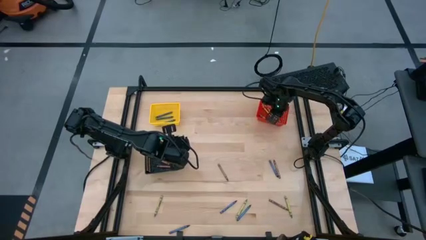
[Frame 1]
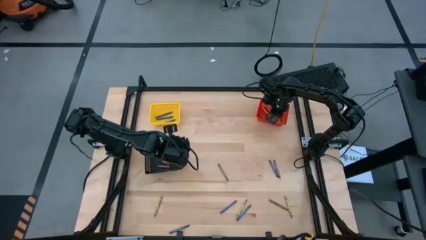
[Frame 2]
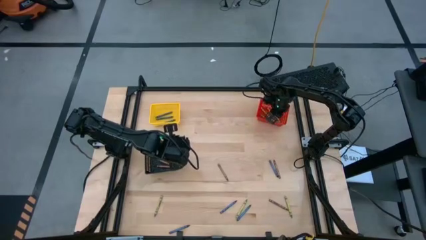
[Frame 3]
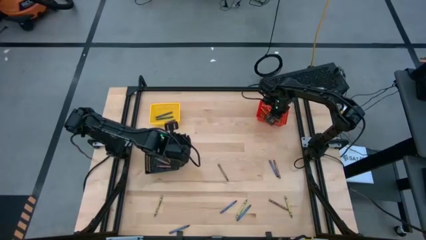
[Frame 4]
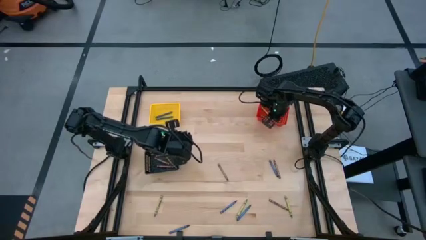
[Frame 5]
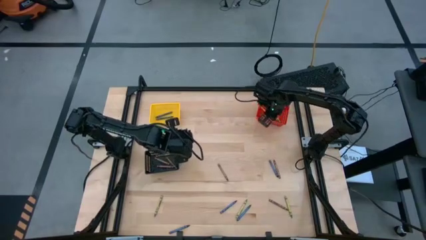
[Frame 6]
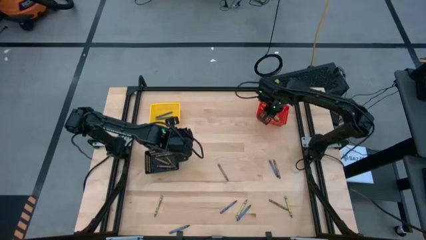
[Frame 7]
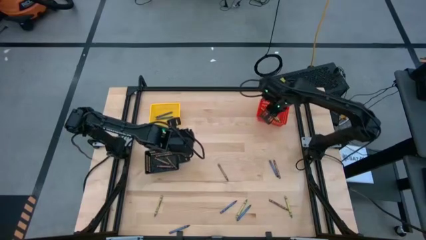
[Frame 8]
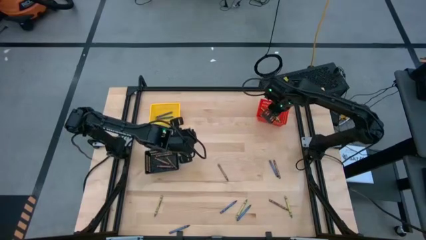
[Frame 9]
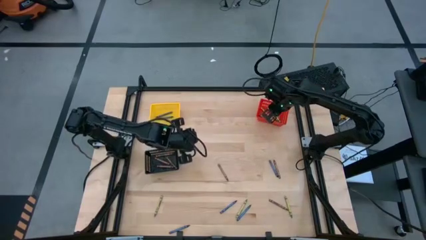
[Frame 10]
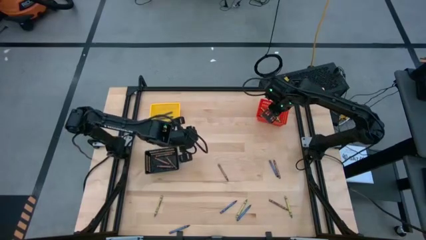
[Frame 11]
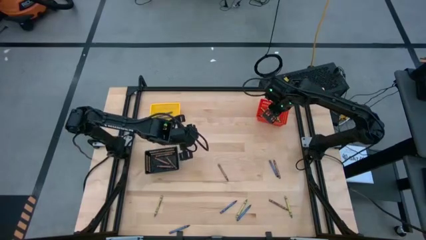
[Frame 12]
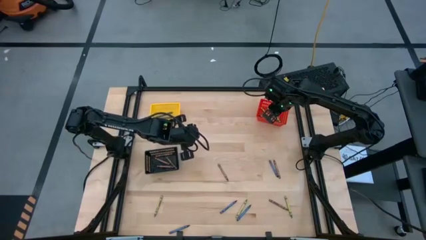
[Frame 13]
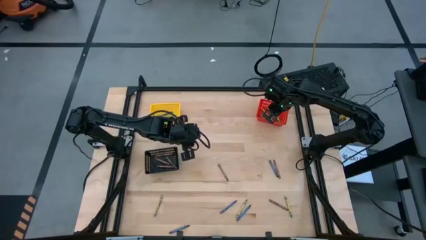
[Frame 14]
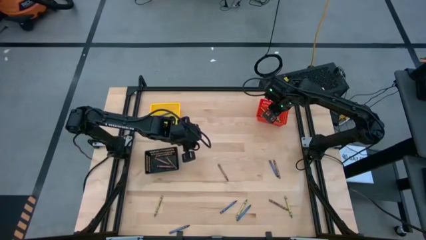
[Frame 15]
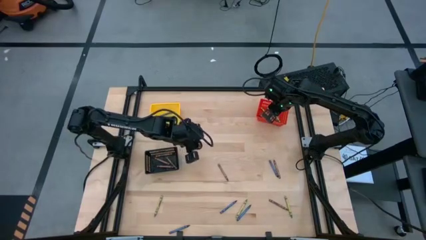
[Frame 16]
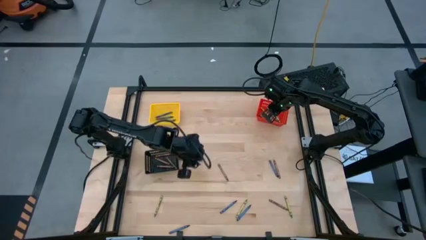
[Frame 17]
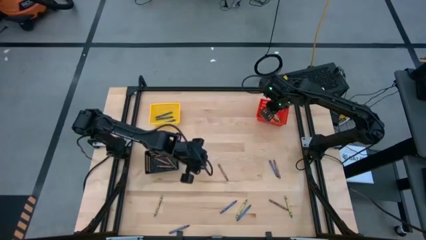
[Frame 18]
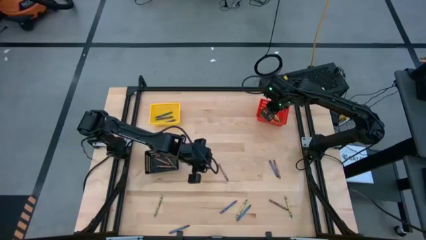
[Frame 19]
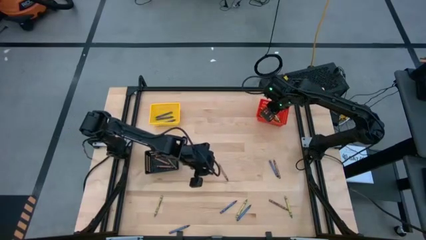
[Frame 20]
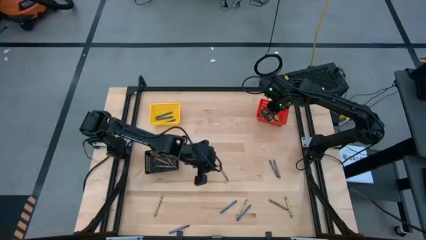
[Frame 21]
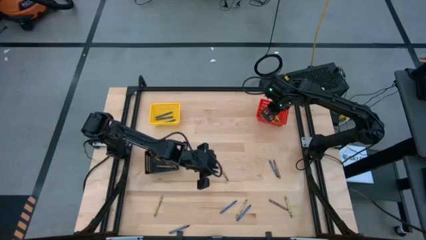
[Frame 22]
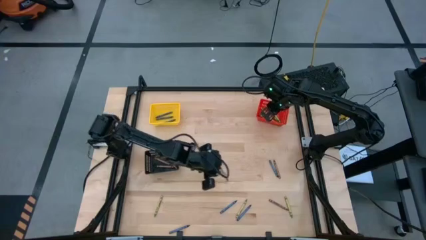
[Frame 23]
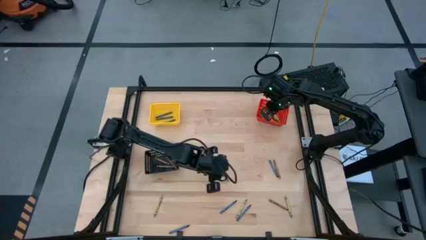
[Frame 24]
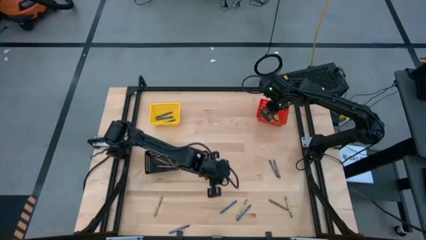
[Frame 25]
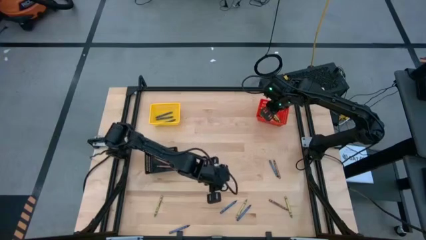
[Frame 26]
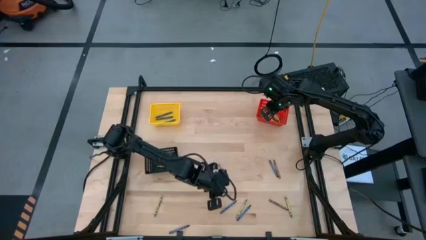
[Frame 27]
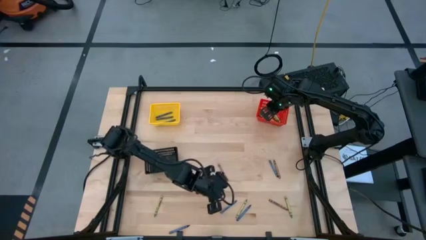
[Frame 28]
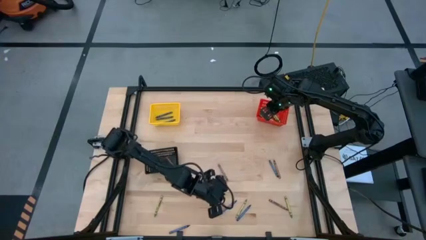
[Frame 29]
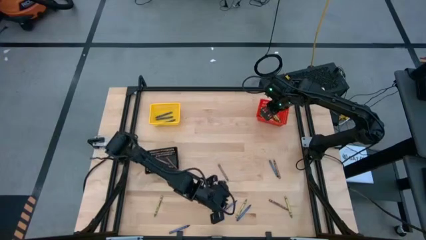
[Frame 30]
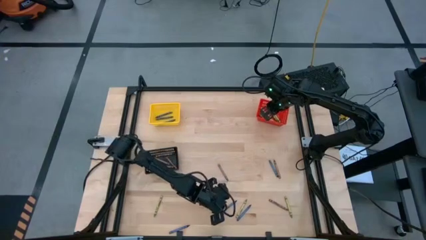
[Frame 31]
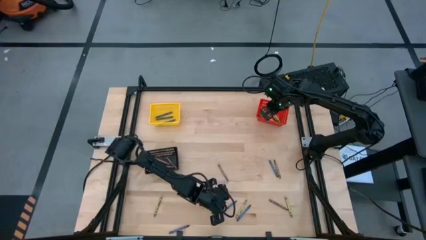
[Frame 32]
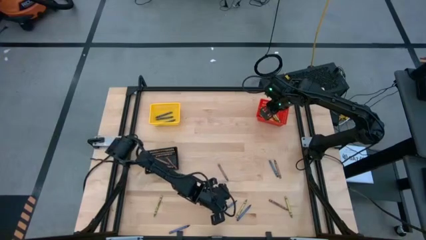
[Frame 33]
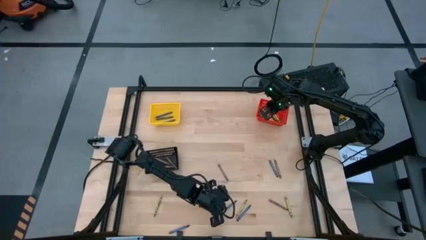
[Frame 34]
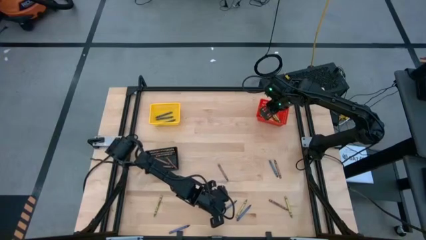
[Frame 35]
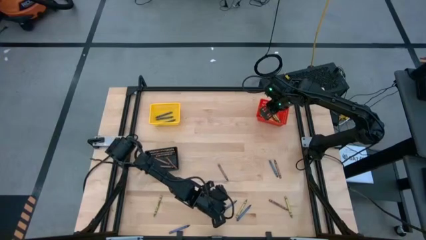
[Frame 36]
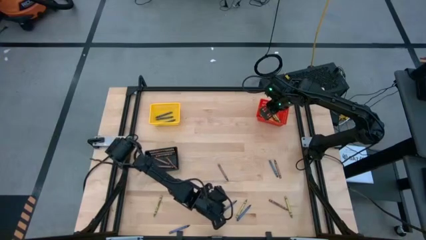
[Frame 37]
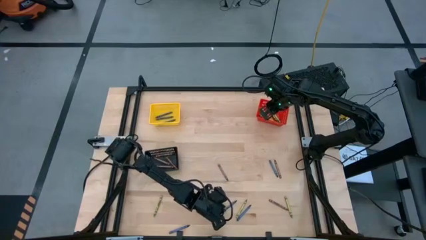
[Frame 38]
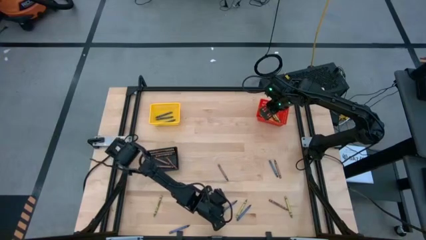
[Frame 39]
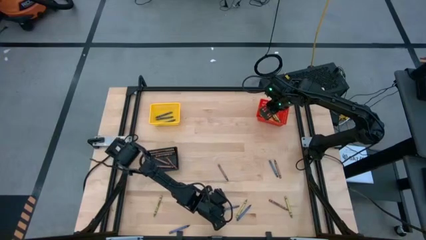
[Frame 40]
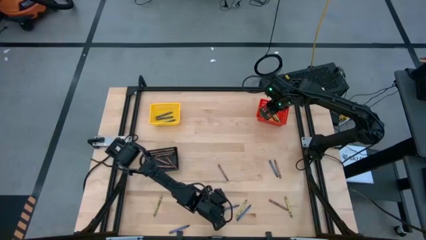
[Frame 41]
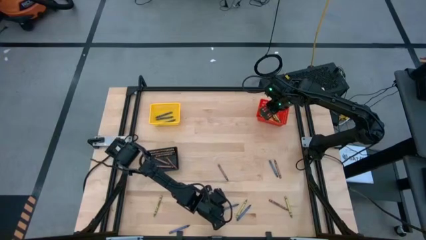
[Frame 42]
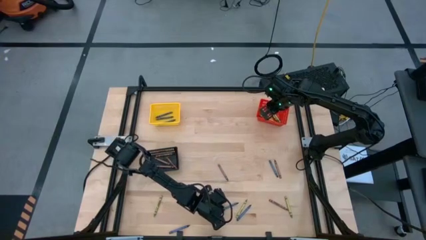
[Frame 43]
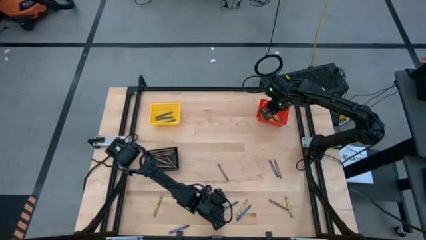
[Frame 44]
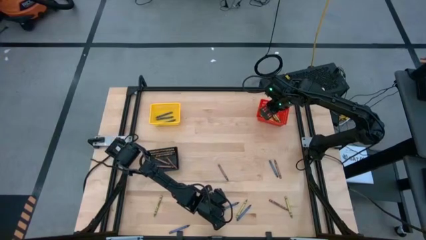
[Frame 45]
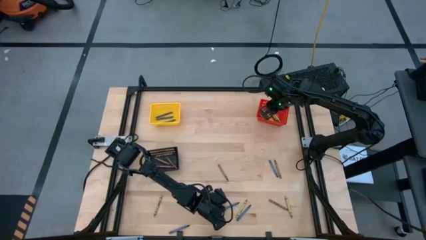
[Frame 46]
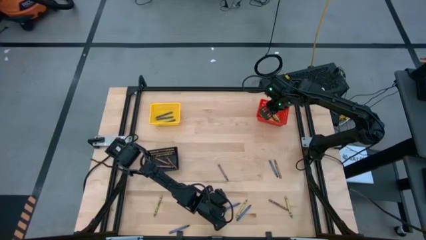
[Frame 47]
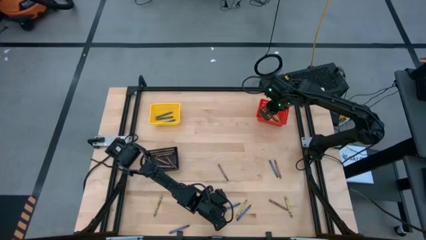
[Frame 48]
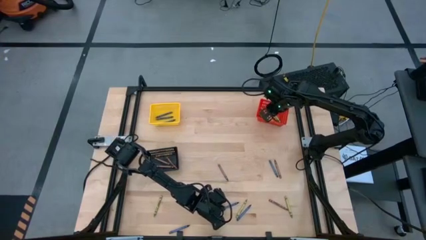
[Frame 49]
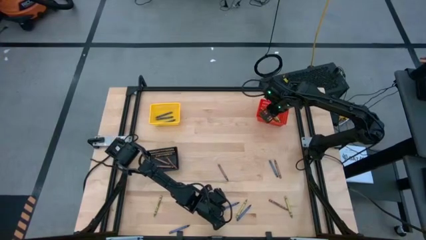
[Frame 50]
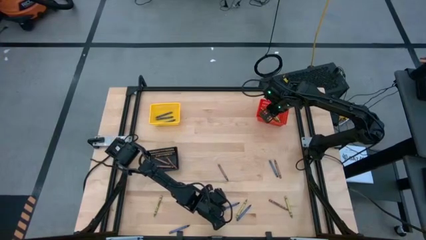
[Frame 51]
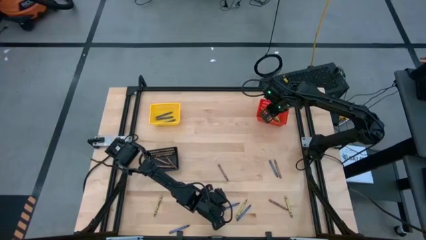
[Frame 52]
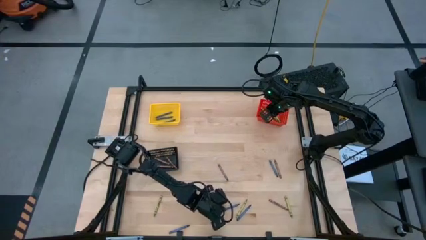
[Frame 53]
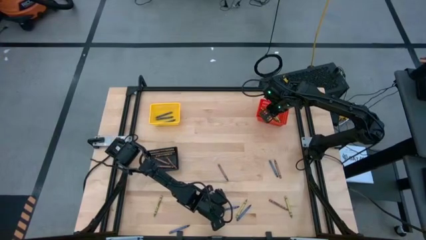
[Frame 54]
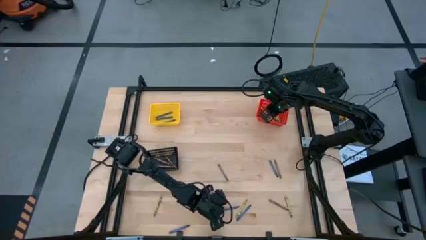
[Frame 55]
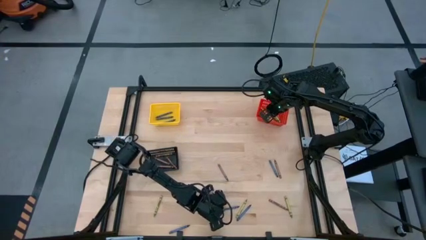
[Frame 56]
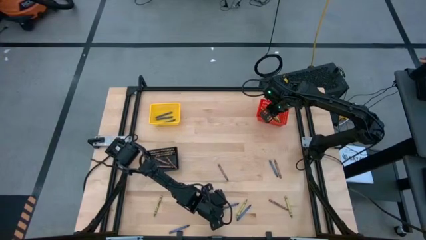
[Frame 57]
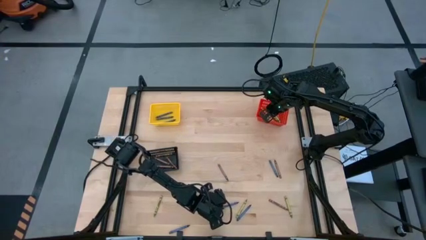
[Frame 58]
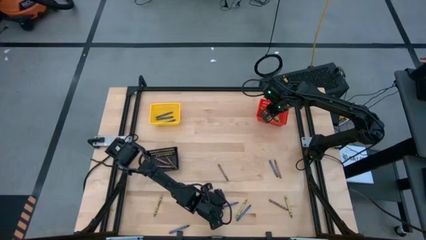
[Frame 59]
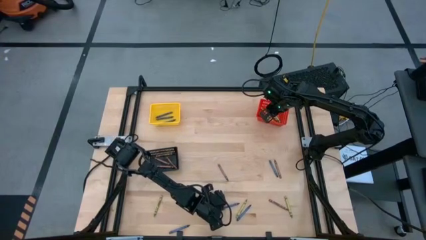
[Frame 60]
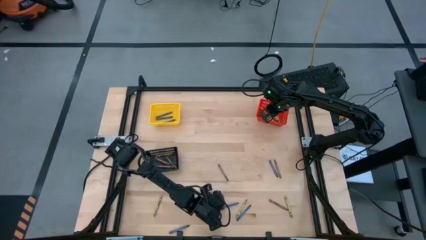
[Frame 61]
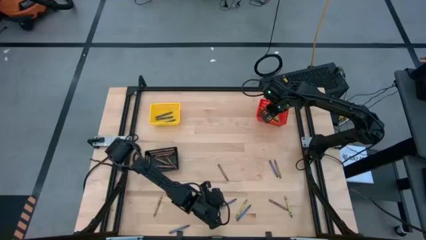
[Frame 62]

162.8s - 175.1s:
Task: Sort crayons
Put the blue crayon into the yellow bin
